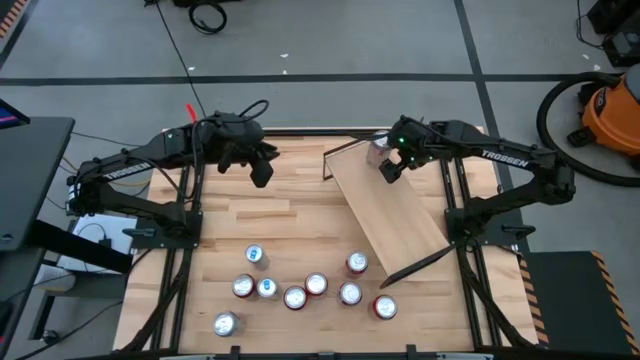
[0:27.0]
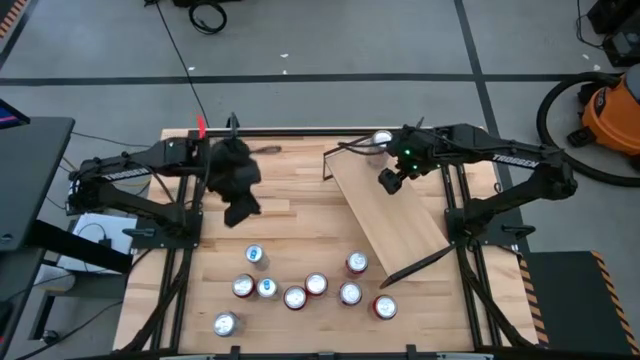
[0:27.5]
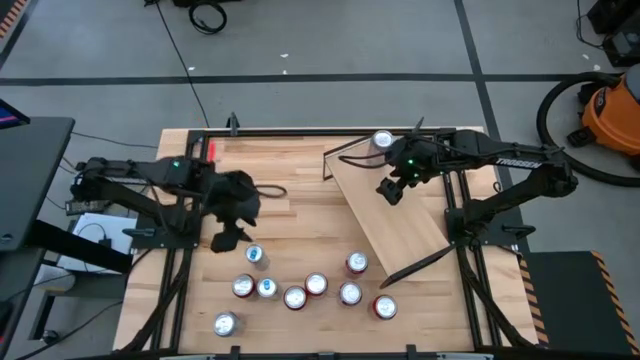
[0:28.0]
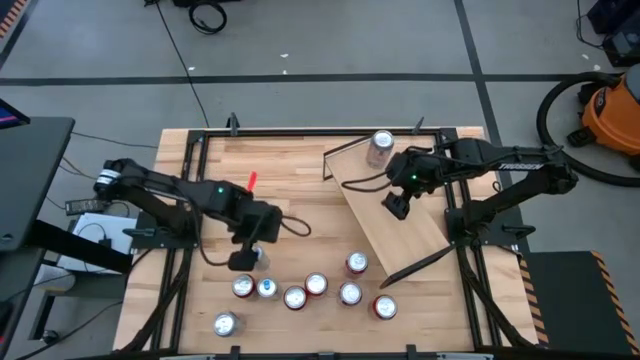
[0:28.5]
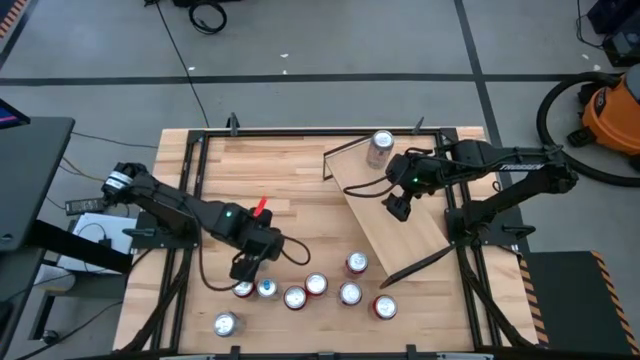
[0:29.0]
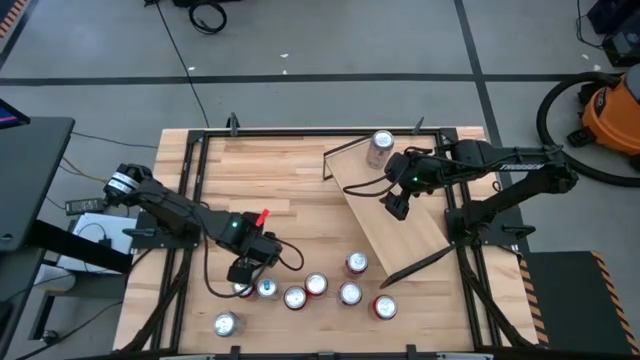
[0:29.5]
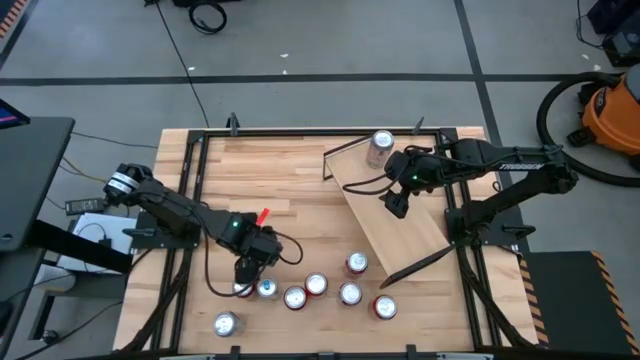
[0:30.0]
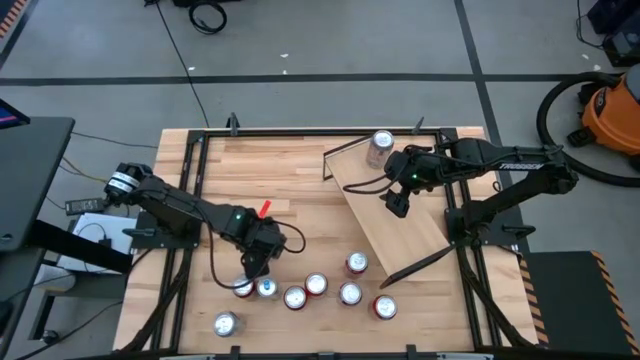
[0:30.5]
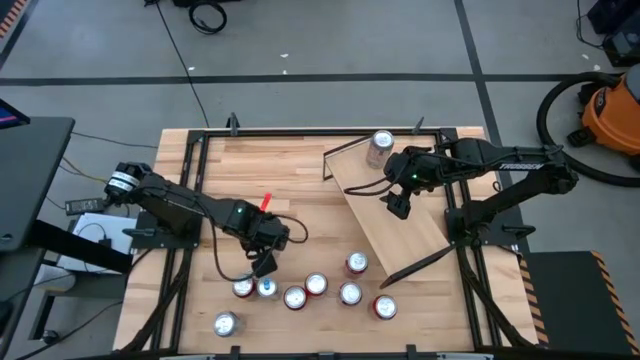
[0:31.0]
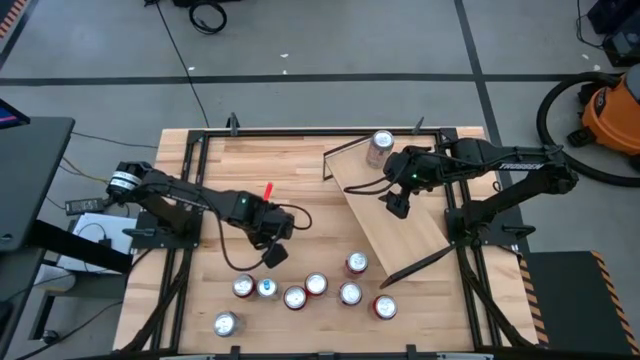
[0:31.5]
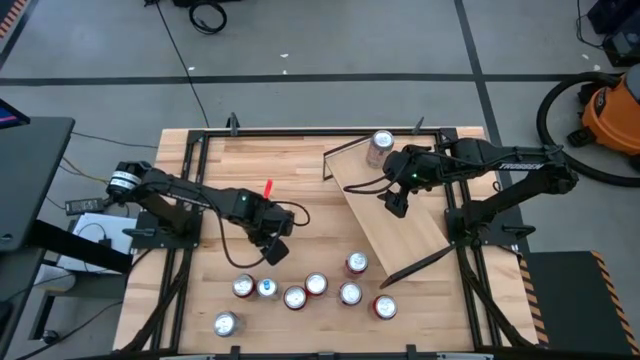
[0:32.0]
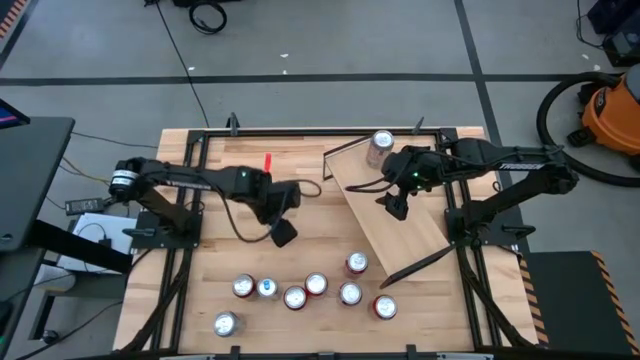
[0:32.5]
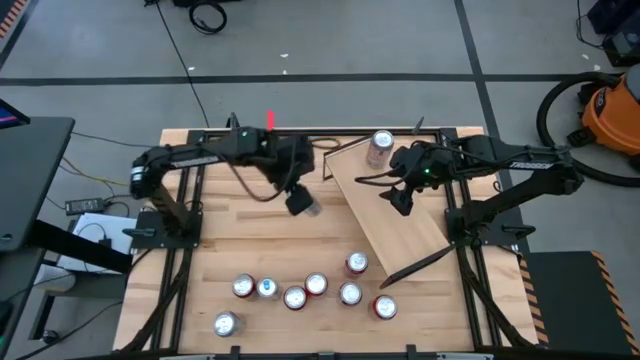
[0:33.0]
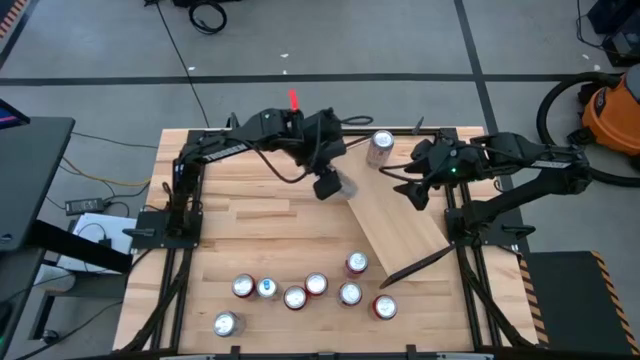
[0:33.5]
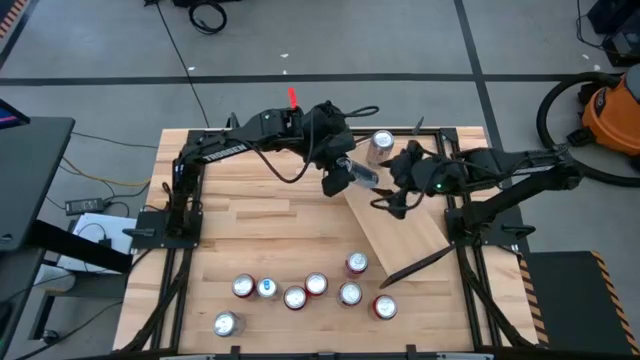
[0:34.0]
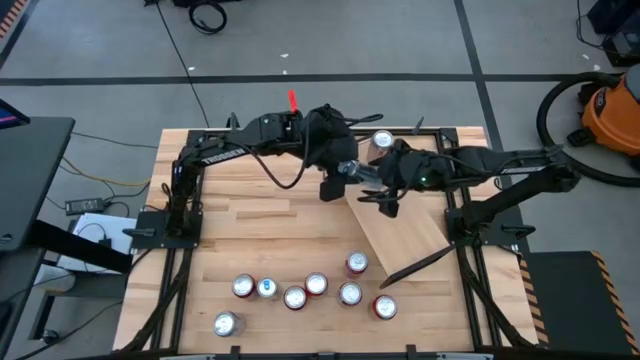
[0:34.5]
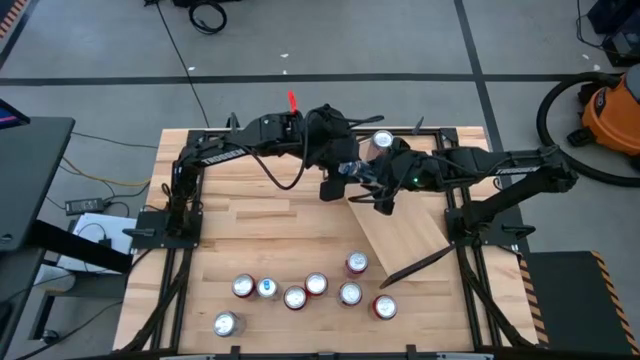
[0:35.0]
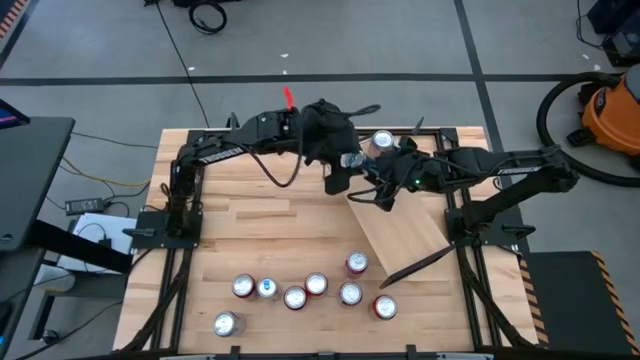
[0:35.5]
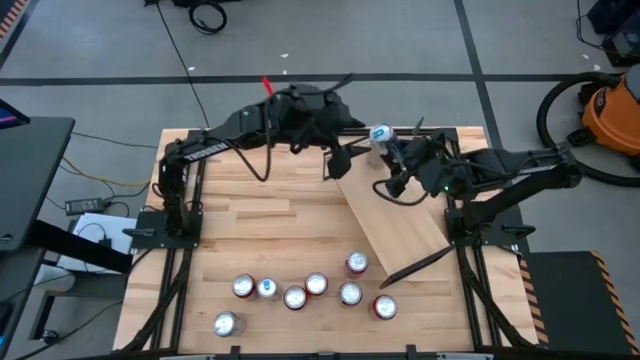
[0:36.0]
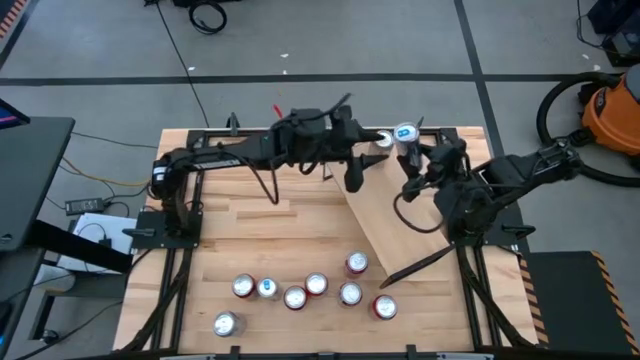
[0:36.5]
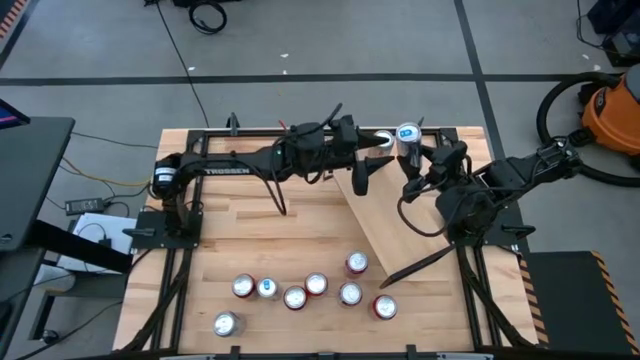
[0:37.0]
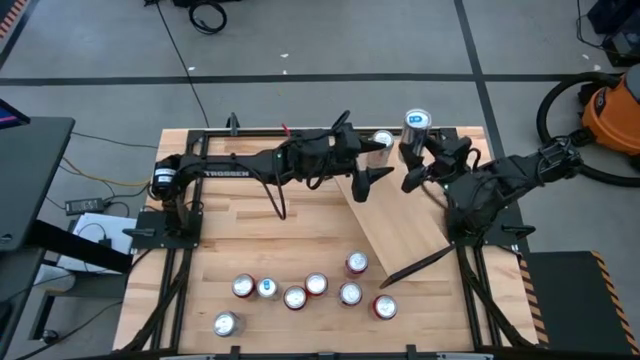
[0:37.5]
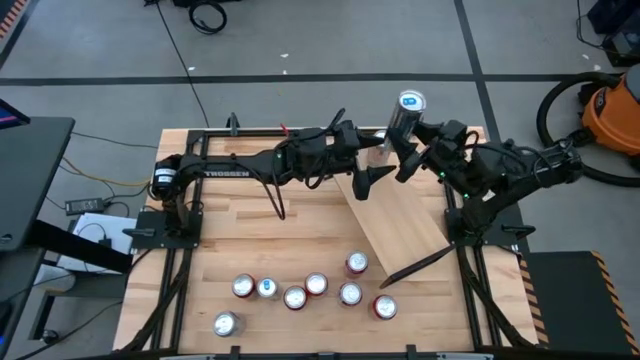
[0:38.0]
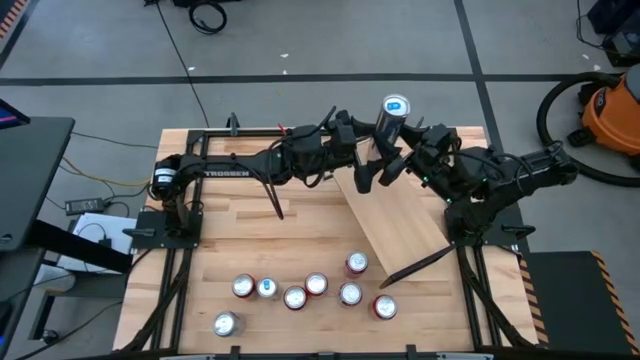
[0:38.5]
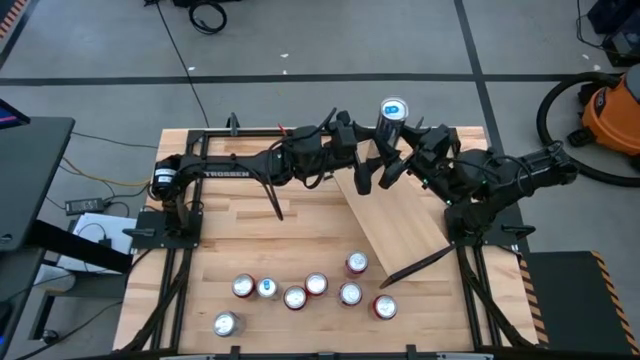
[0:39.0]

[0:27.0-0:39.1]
Task: Place canned beverage on shelf
Put the top blue soda can on the shelf

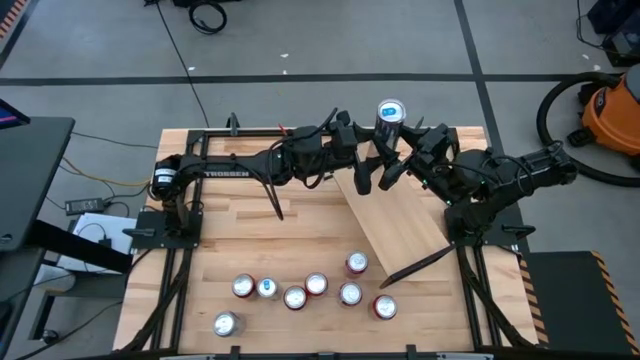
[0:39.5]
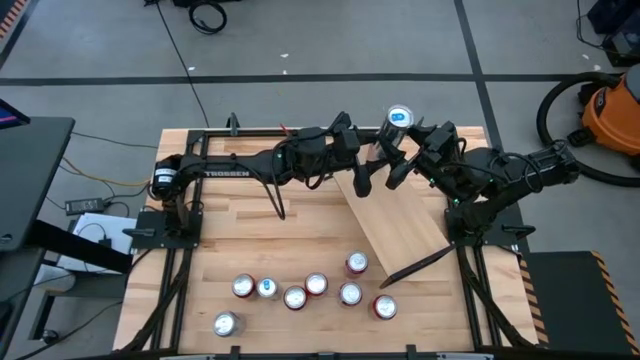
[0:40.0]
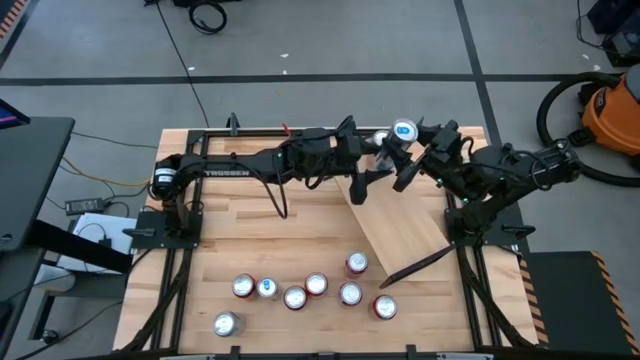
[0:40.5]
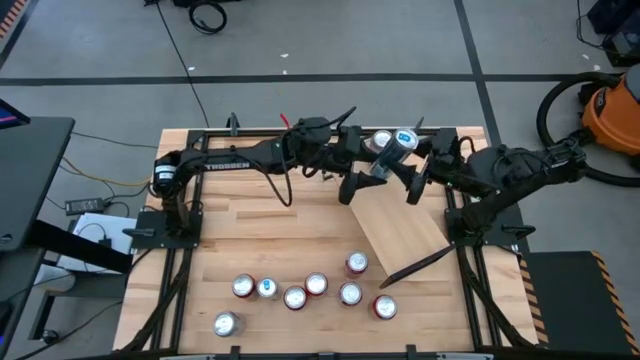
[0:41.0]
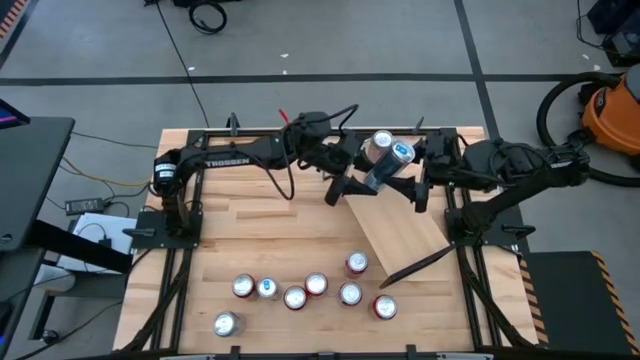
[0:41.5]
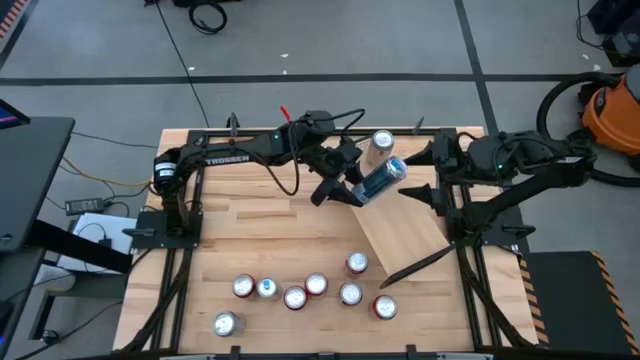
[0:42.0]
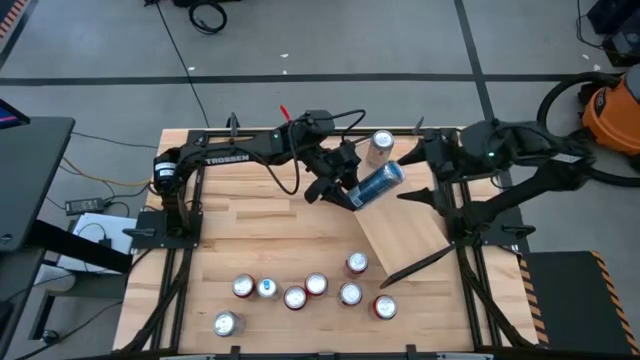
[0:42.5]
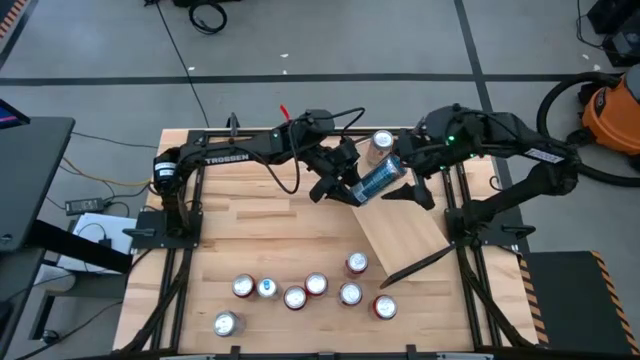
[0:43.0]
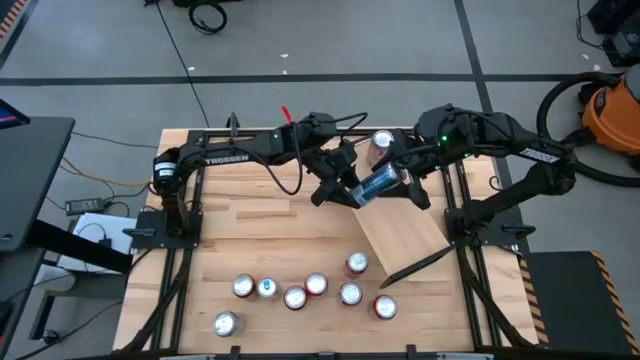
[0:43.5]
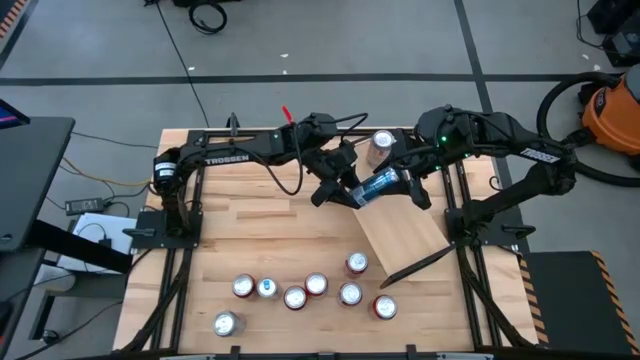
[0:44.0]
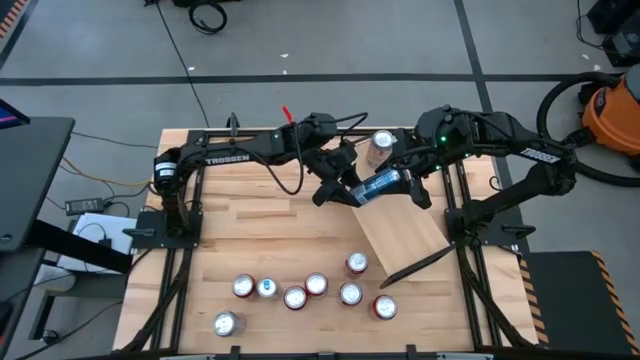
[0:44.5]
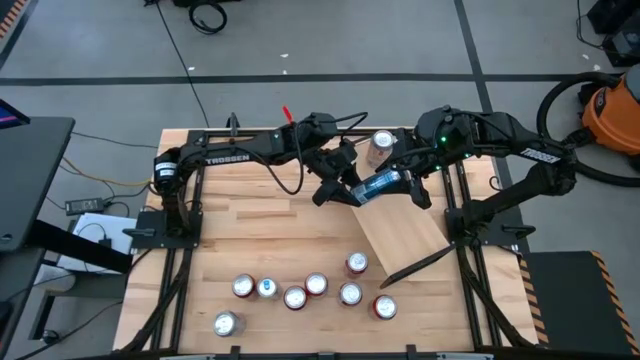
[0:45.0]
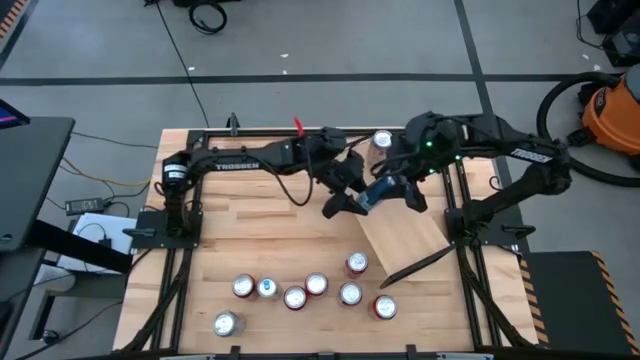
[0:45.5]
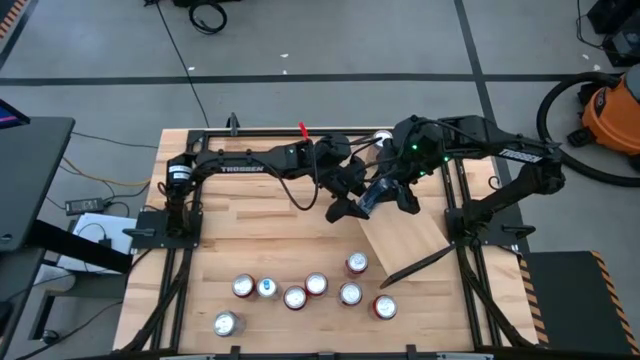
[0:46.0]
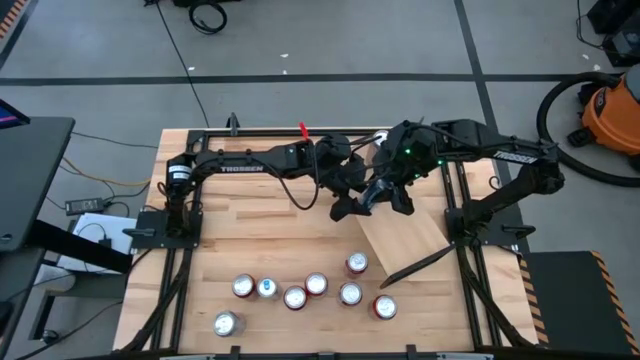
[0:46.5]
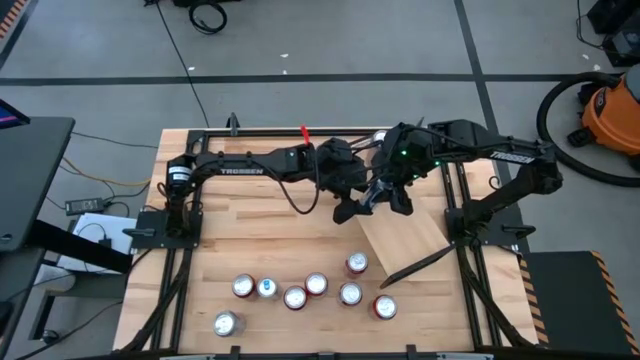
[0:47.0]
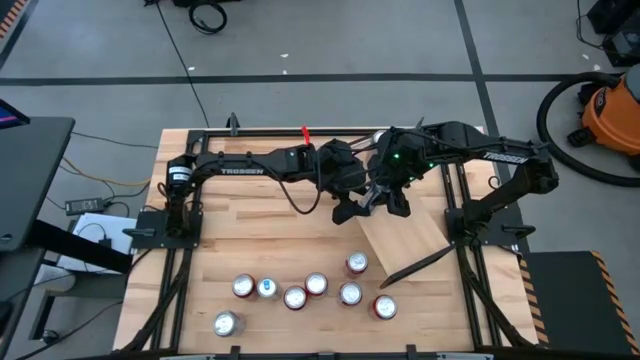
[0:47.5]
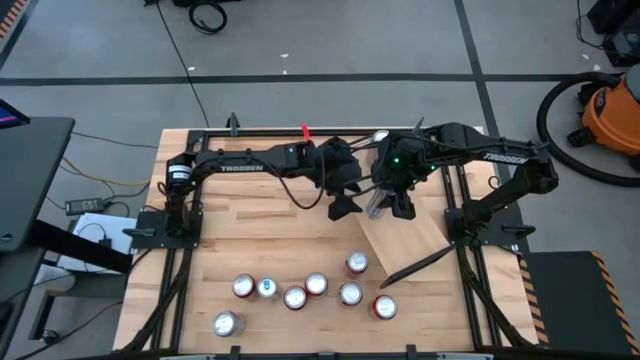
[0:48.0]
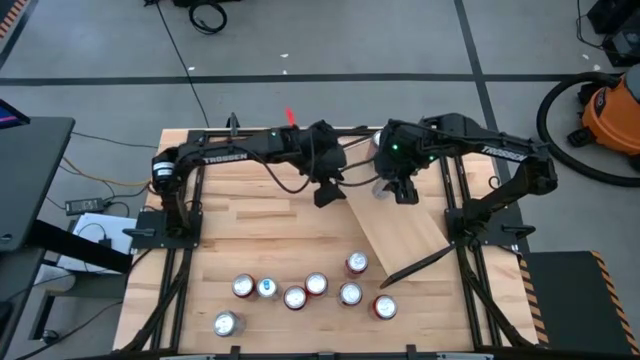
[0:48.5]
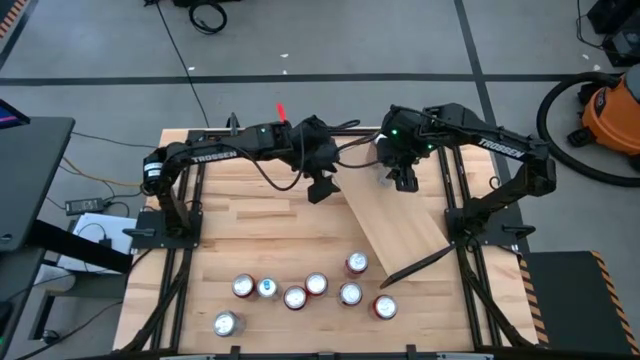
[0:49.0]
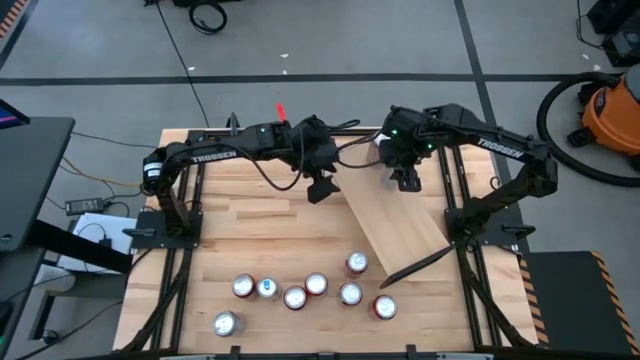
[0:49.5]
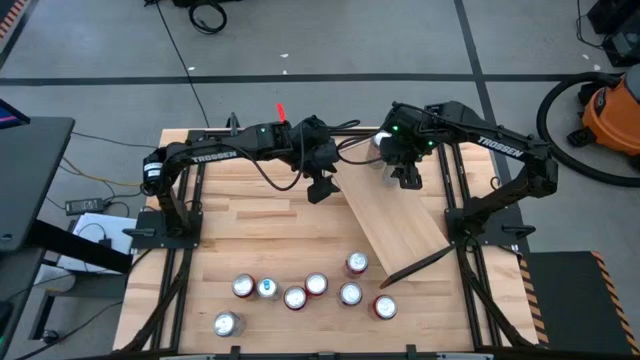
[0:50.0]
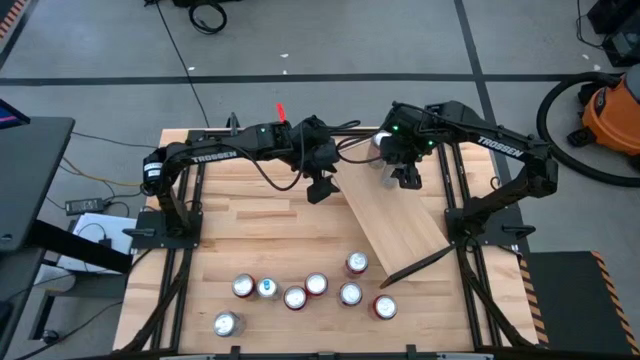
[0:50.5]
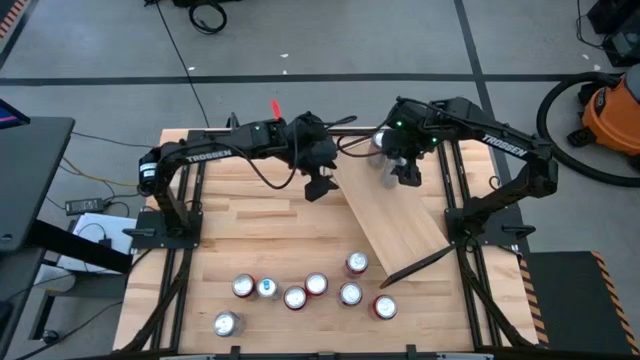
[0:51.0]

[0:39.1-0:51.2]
Put the top blue soda can on the shelf
